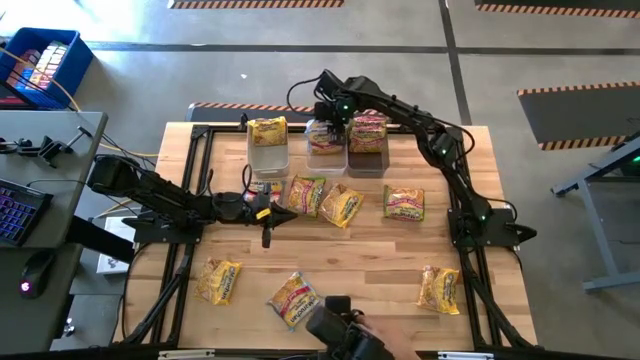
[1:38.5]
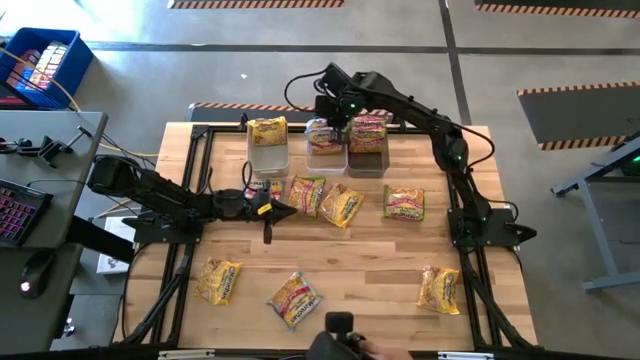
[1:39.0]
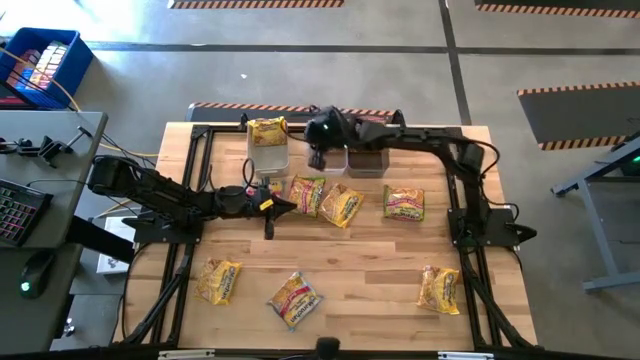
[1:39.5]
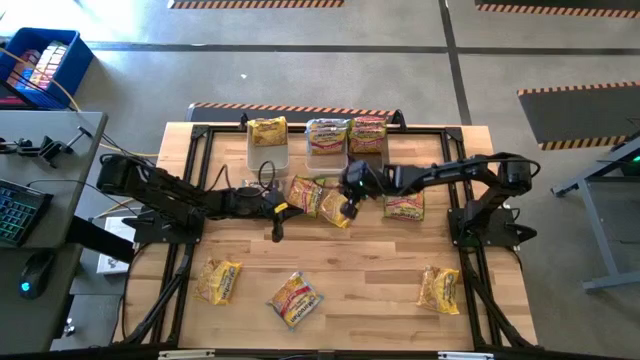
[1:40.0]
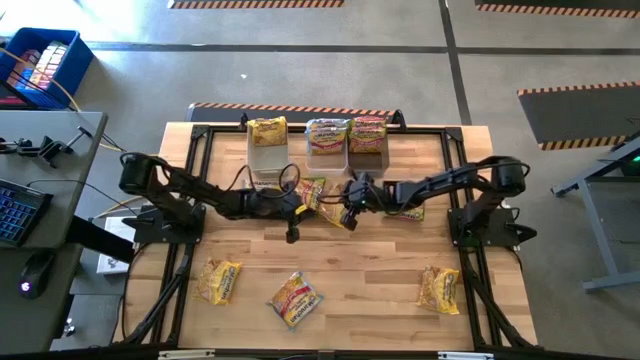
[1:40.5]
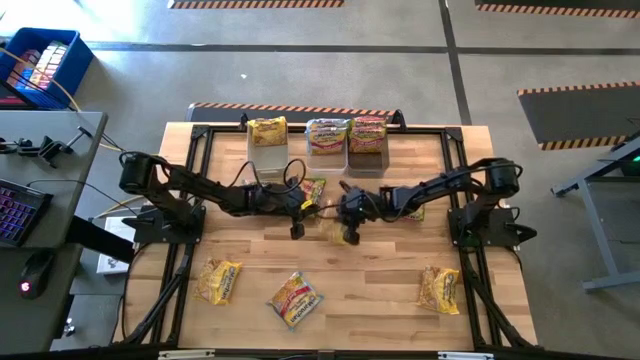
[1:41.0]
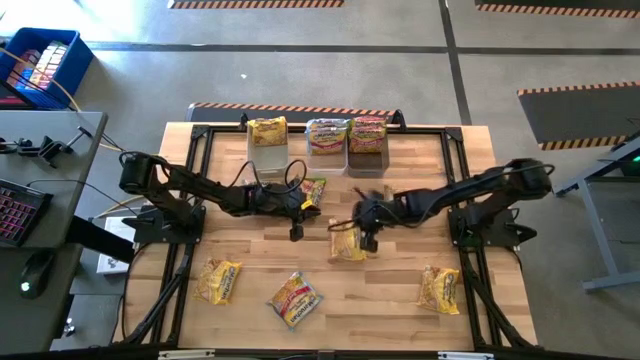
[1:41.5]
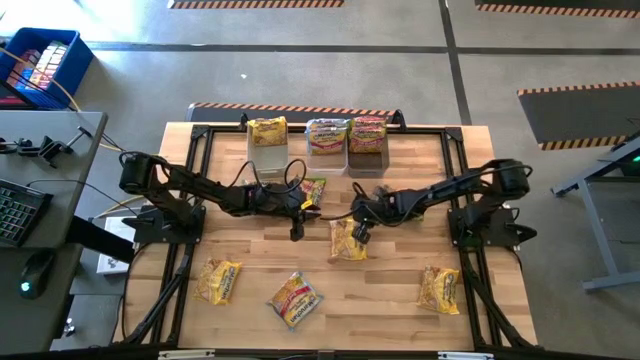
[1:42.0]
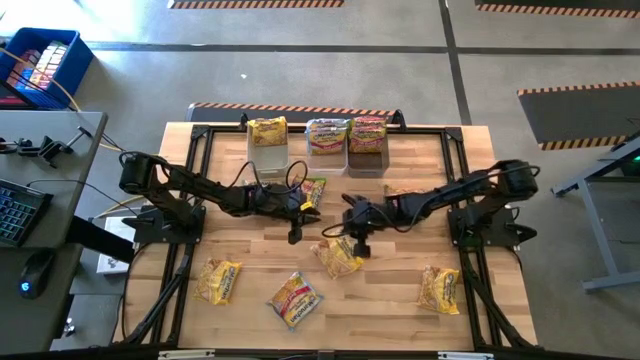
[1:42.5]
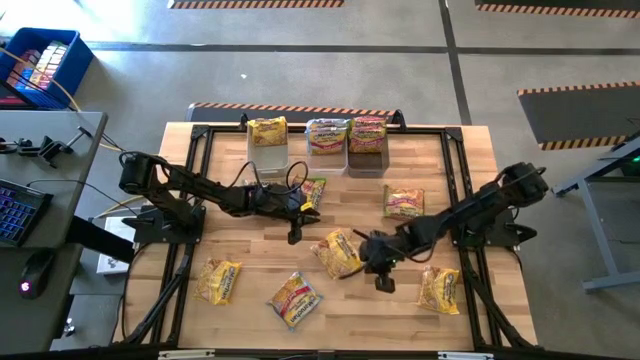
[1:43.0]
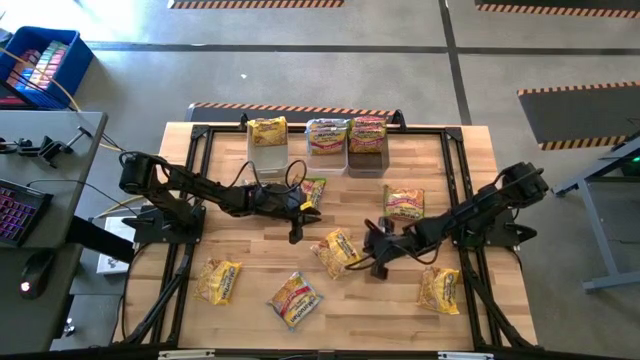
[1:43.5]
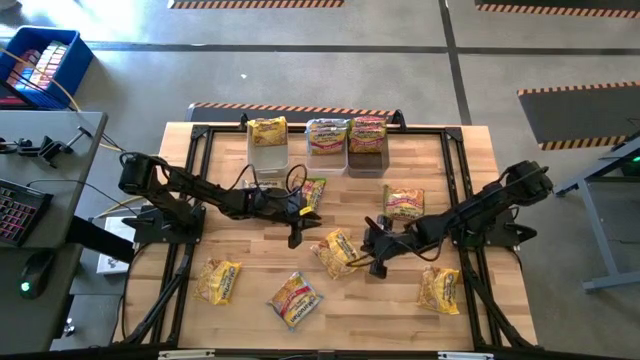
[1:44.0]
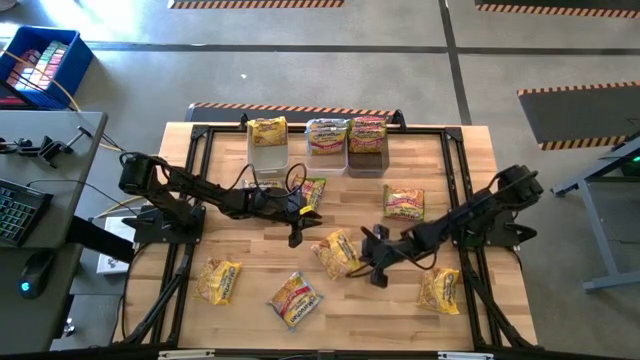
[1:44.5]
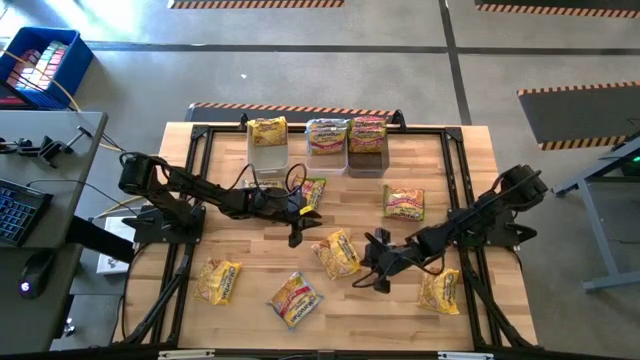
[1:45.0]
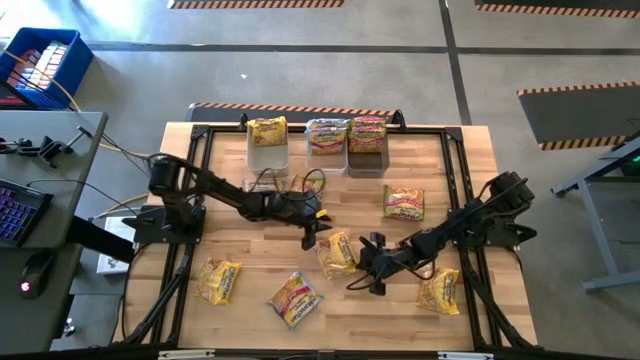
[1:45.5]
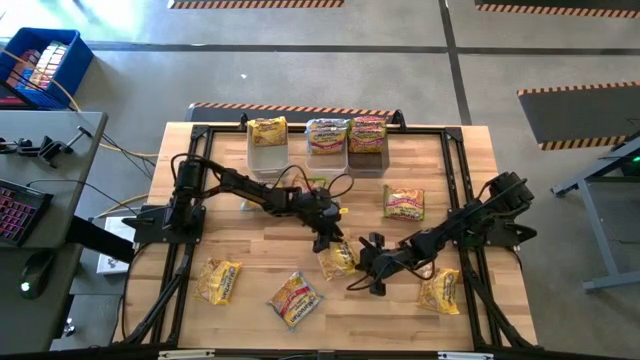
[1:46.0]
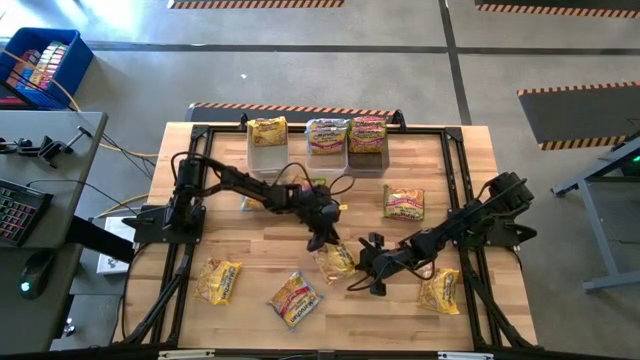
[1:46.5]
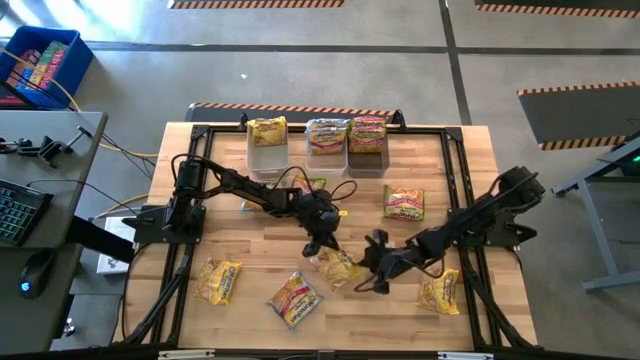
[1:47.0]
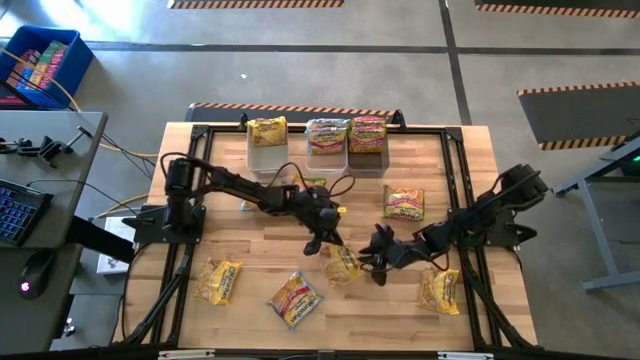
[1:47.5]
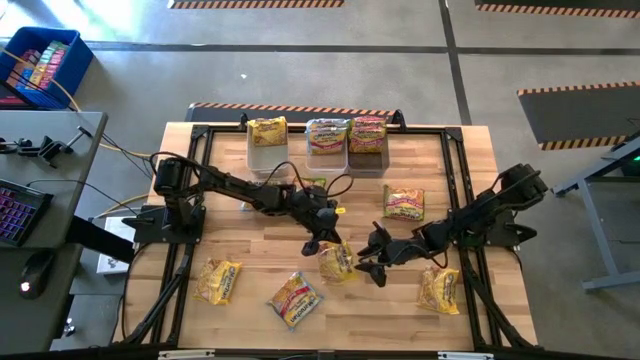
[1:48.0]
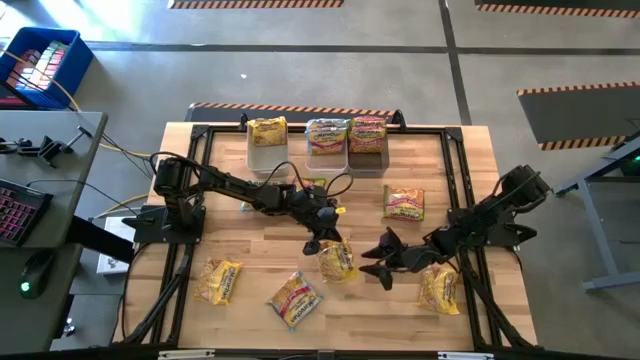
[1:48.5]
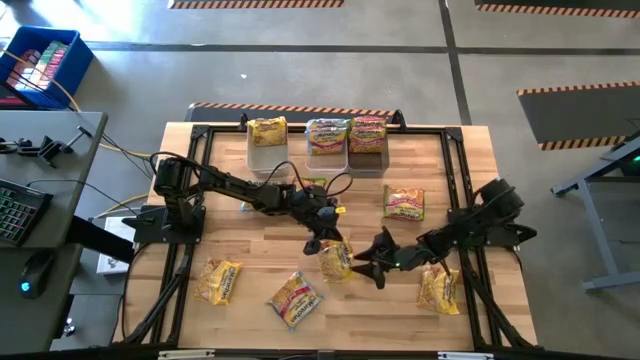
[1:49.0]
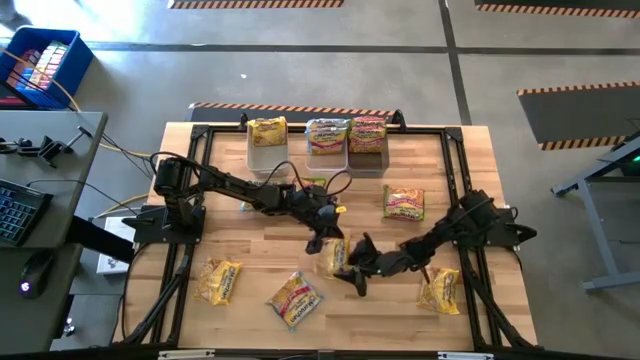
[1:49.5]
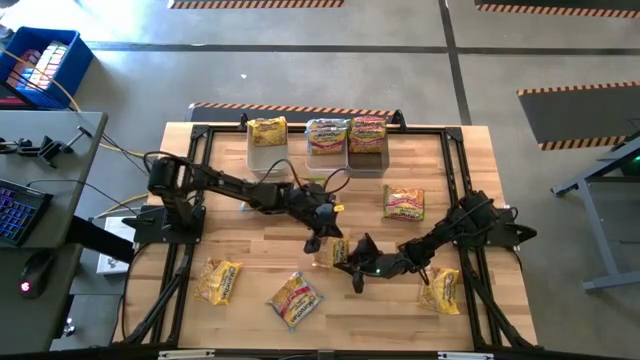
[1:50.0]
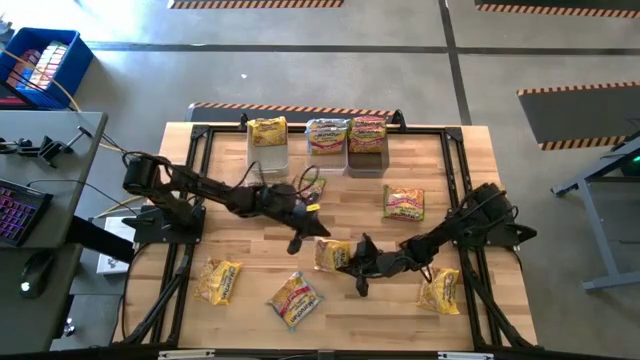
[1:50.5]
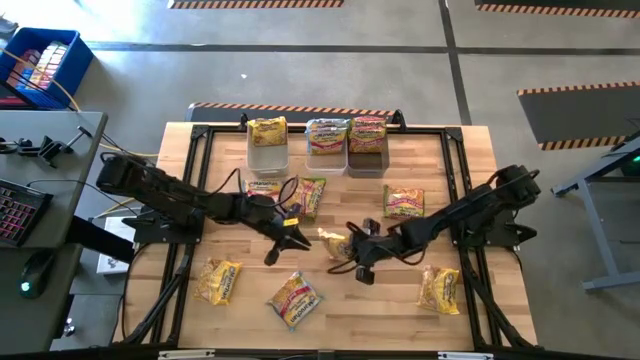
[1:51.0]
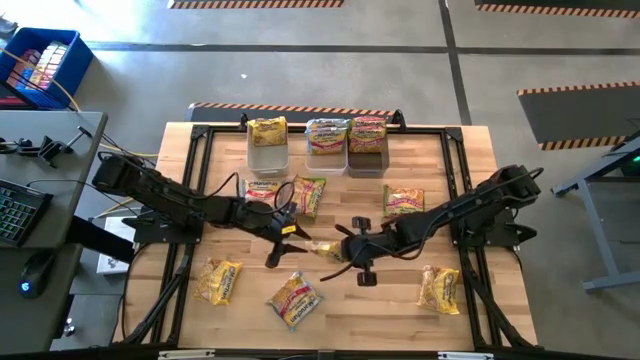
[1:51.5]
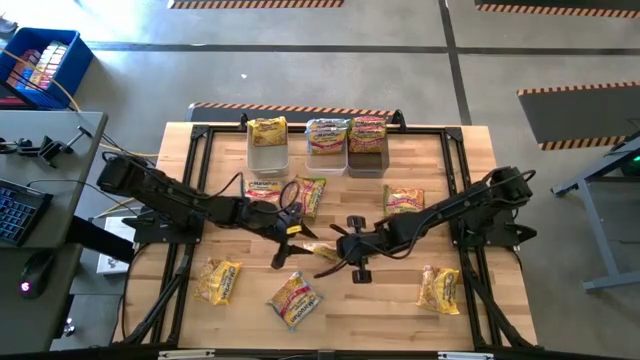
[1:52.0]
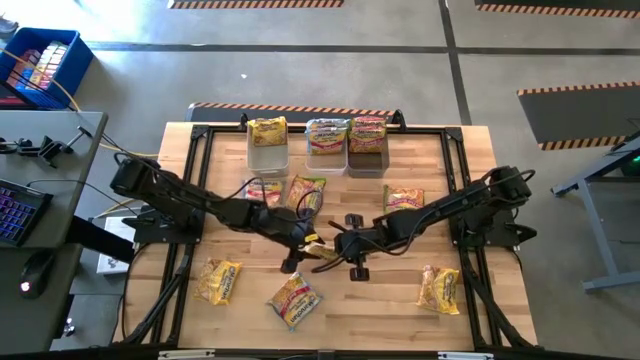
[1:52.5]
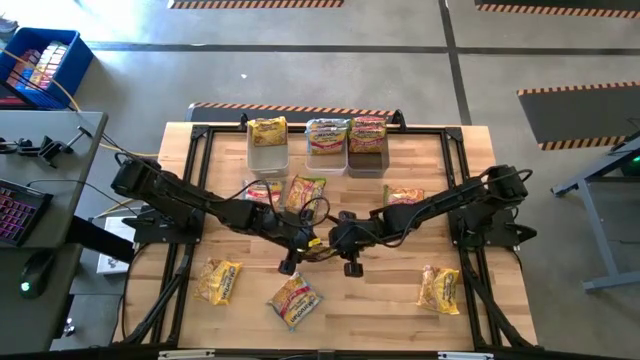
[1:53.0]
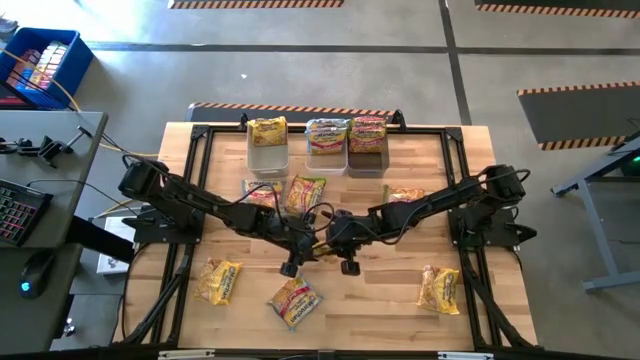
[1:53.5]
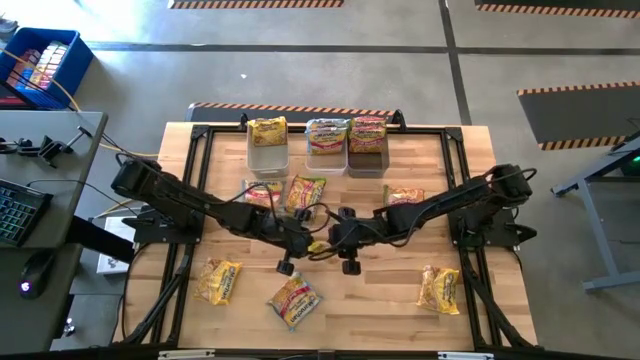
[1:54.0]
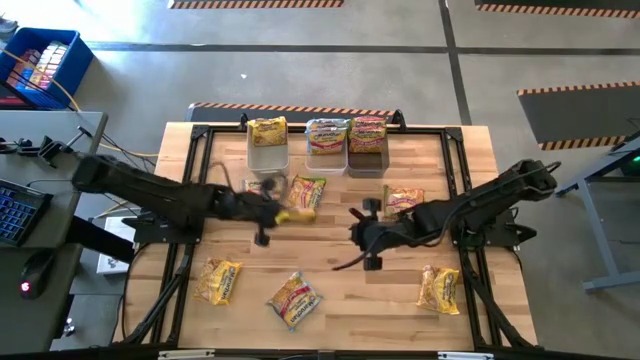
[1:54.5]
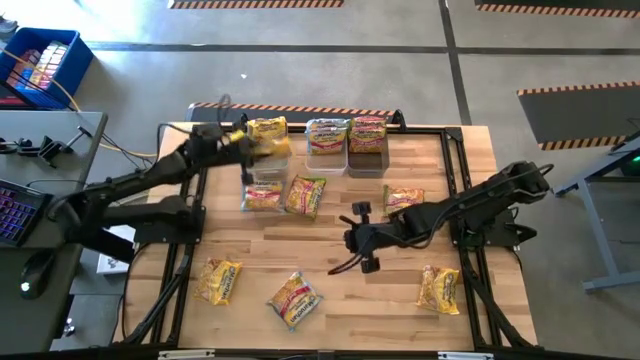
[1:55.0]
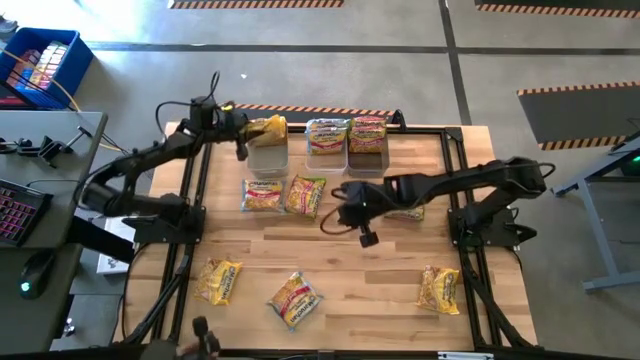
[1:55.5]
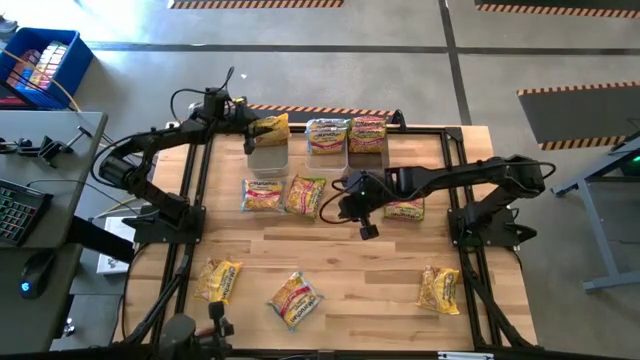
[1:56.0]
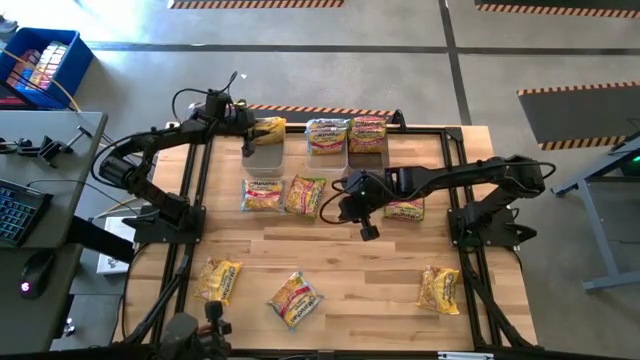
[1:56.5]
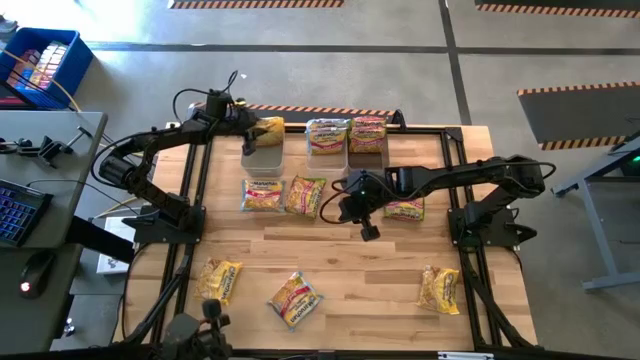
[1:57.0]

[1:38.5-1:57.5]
Task: Sort Maruchan noodles
Put the middle yellow noodle pack into the gray bin

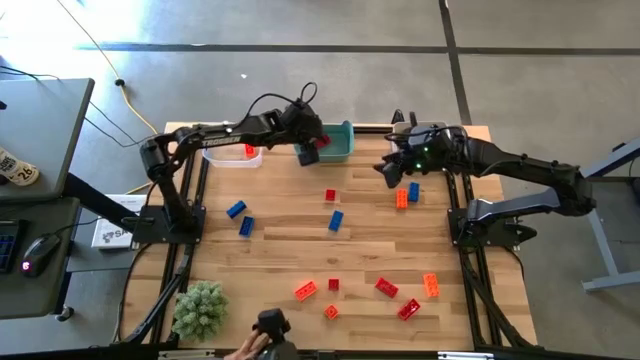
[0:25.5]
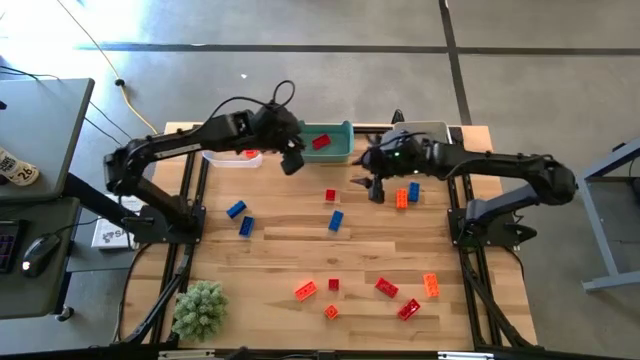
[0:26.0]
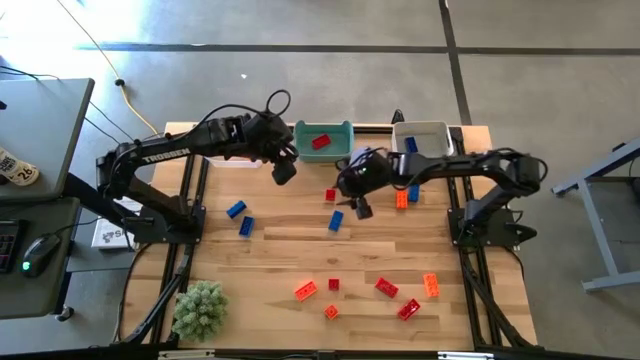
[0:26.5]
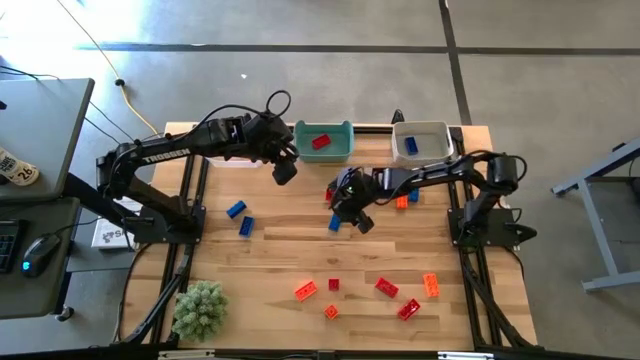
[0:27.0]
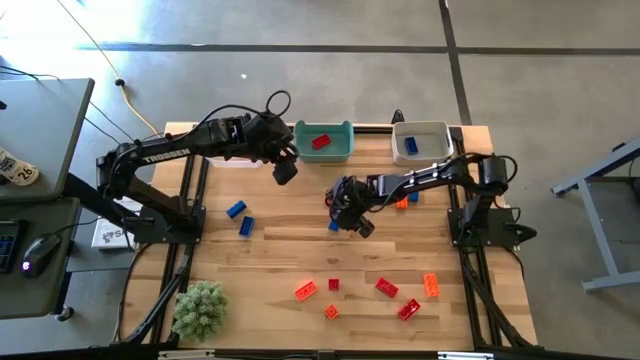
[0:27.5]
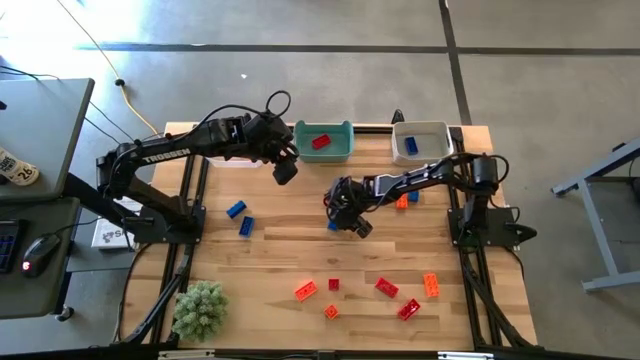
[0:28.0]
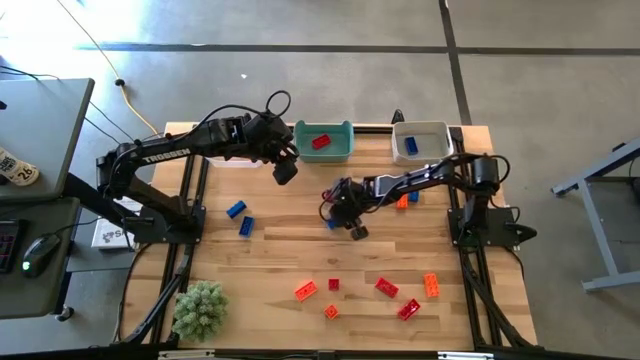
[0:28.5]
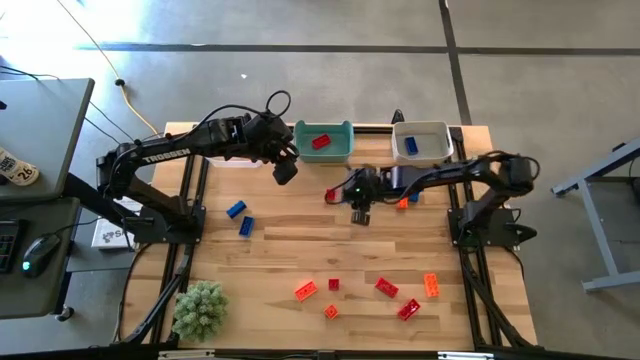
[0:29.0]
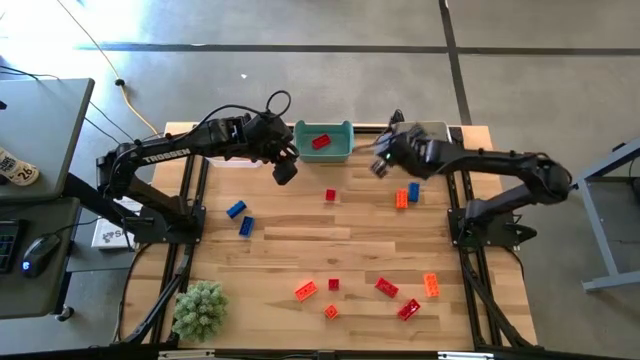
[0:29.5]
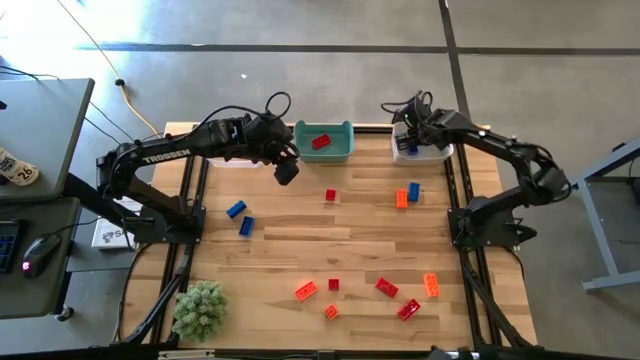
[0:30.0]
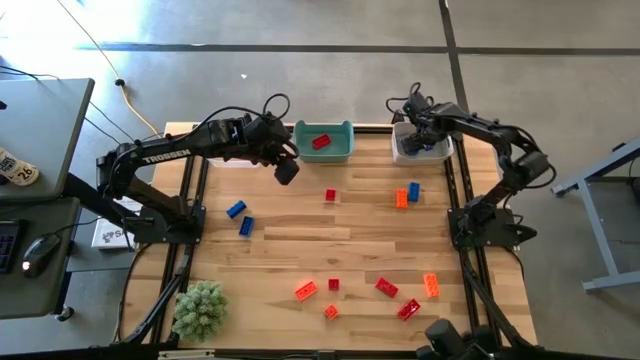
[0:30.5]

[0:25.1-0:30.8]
Task: Sort & place blocks by color
Put the blue game piece into the white bin
